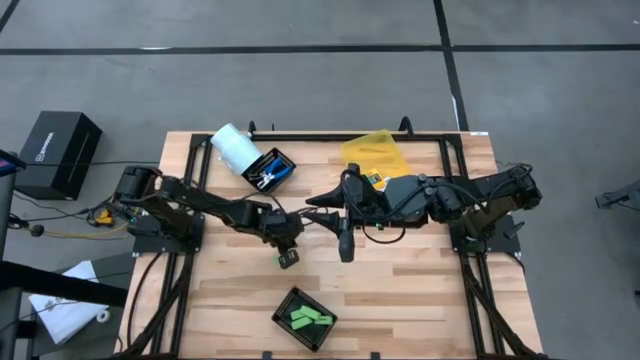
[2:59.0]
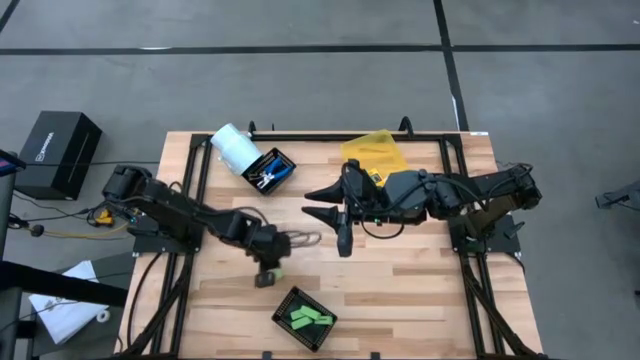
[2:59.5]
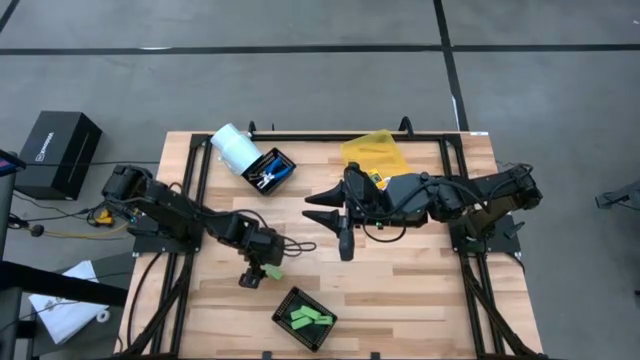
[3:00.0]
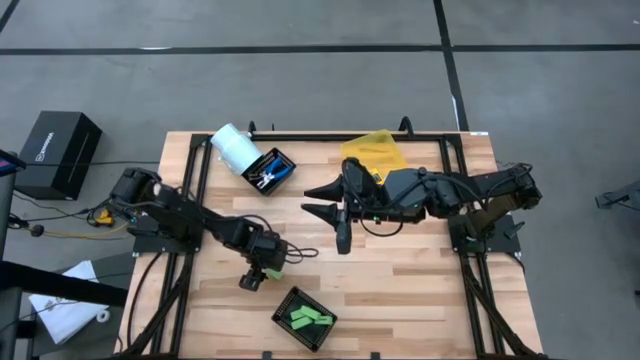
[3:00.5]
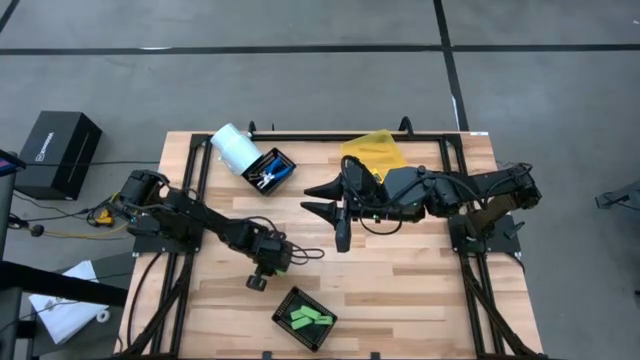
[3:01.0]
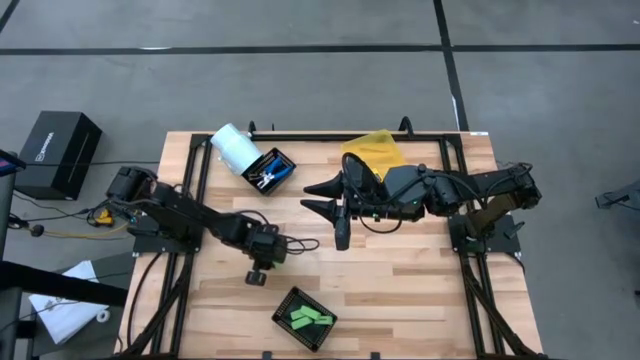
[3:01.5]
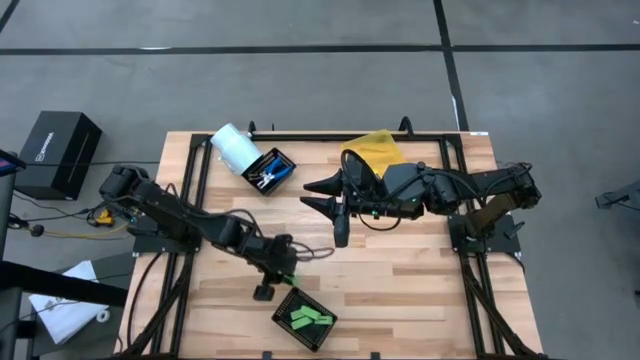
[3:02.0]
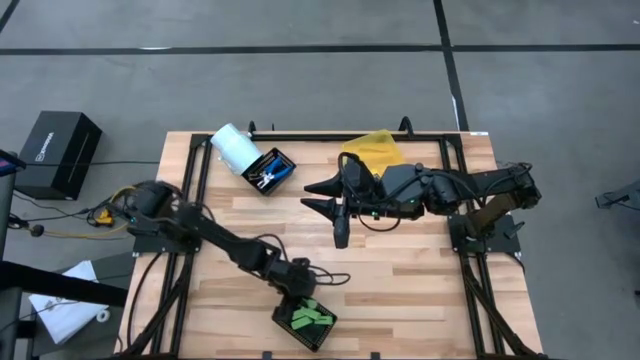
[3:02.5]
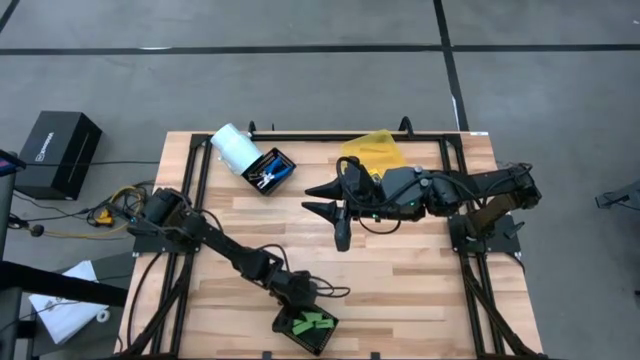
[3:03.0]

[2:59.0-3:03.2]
Task: Pick & Place School Supplies
Put the green eraser into the bottom black bin

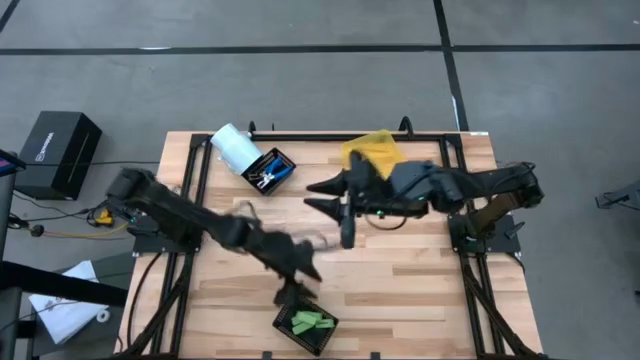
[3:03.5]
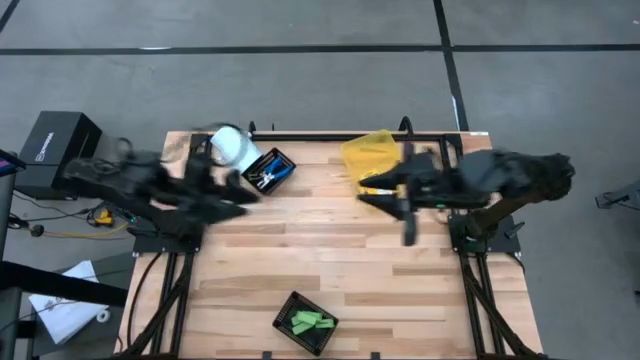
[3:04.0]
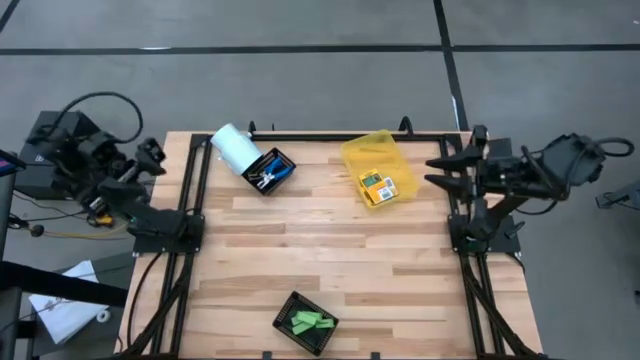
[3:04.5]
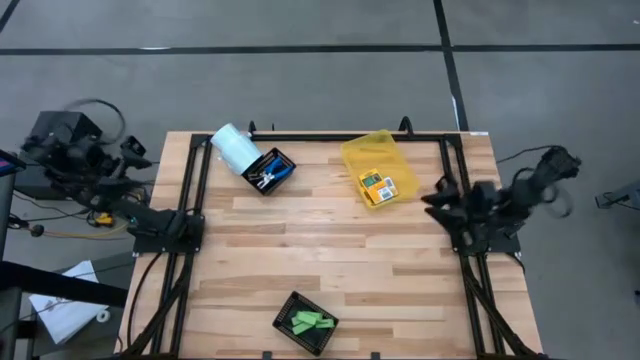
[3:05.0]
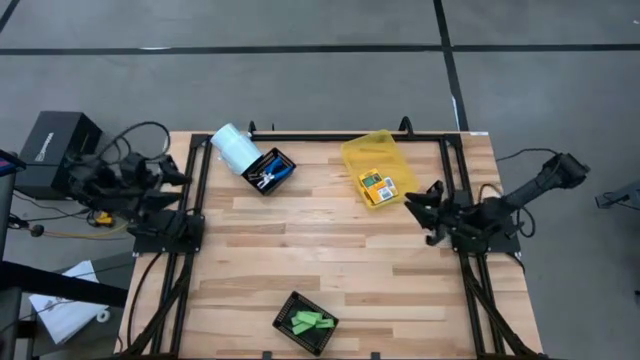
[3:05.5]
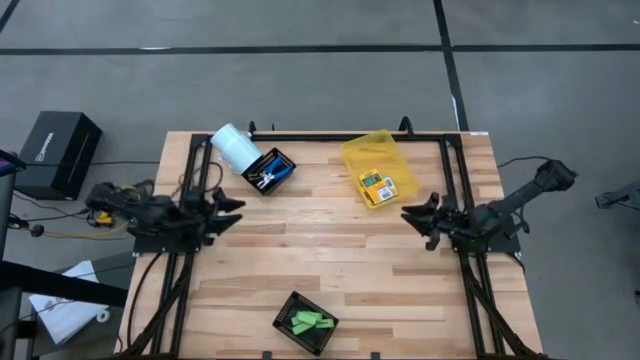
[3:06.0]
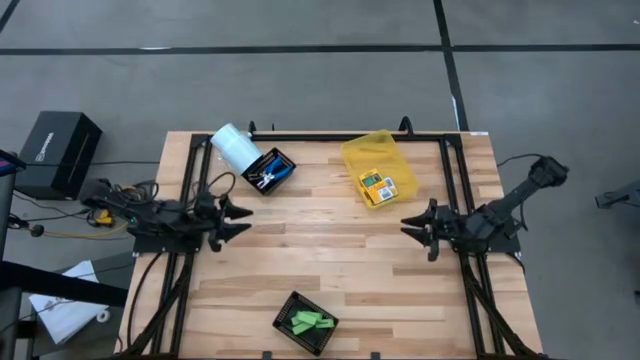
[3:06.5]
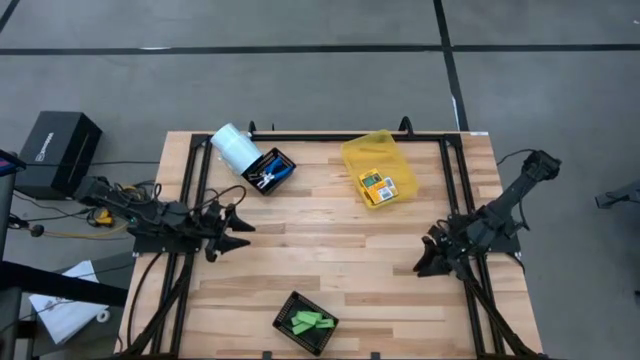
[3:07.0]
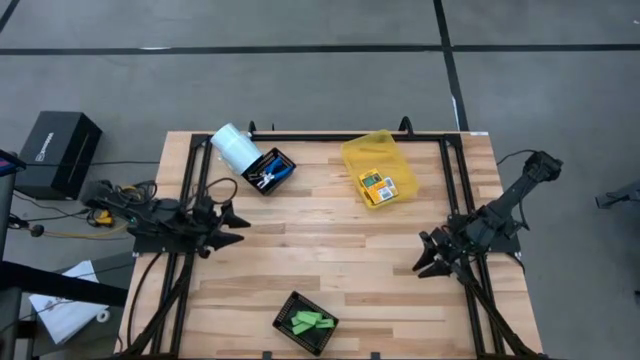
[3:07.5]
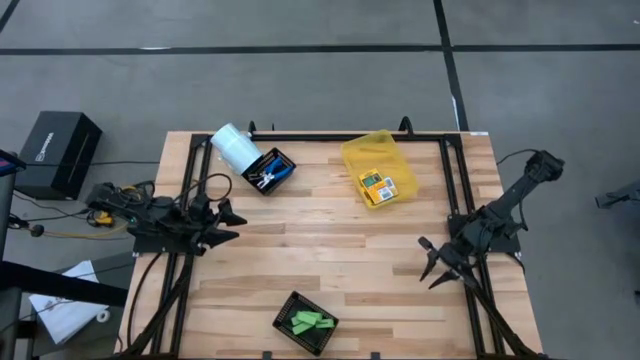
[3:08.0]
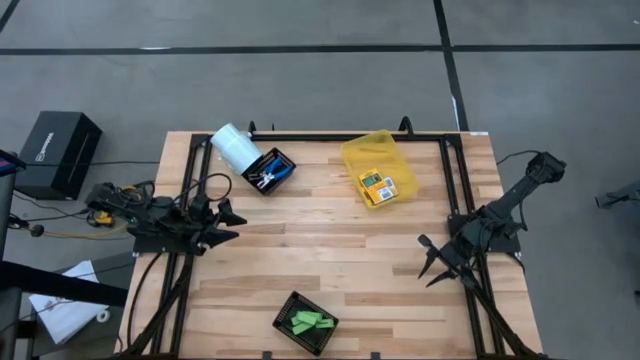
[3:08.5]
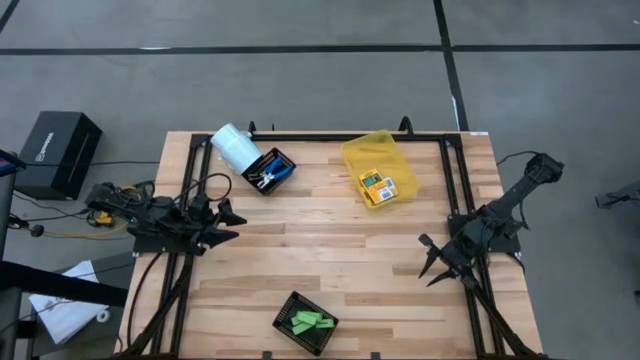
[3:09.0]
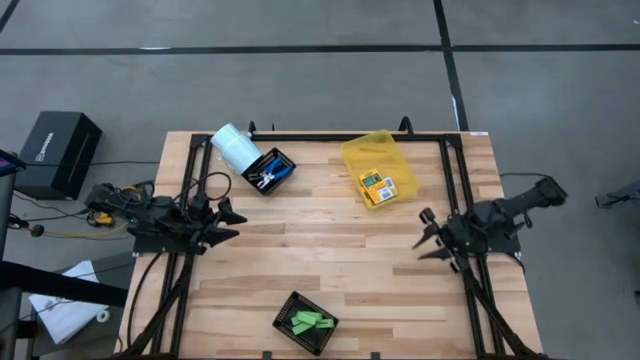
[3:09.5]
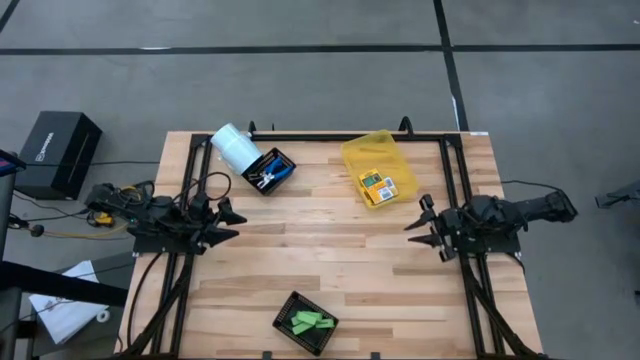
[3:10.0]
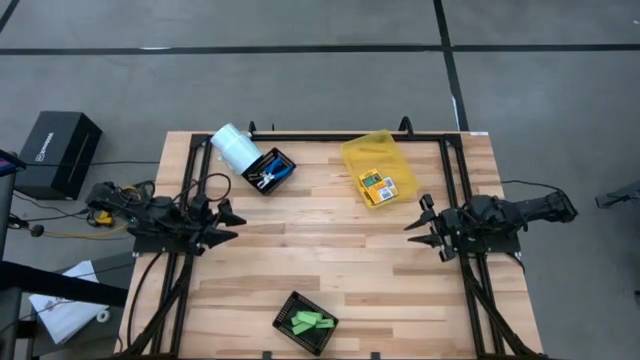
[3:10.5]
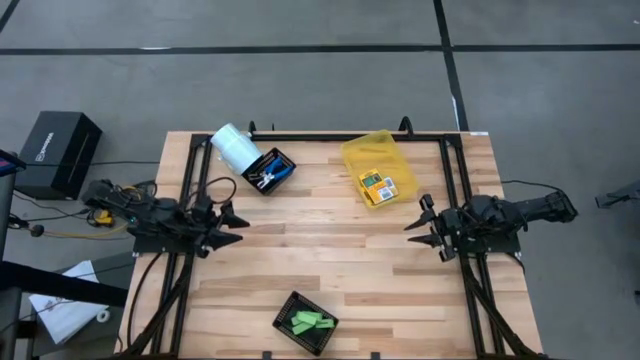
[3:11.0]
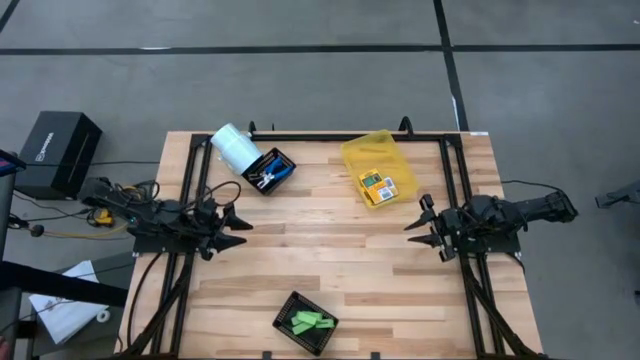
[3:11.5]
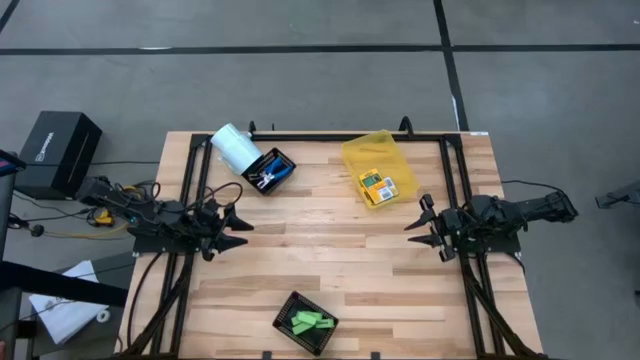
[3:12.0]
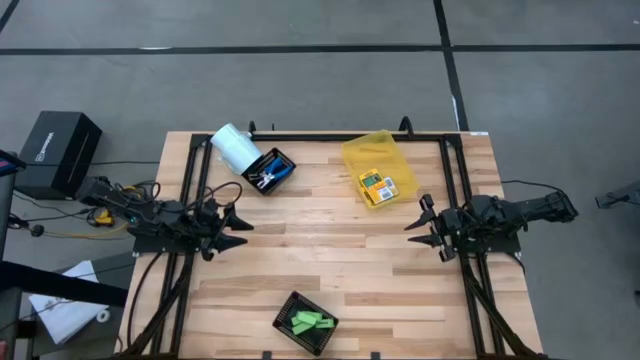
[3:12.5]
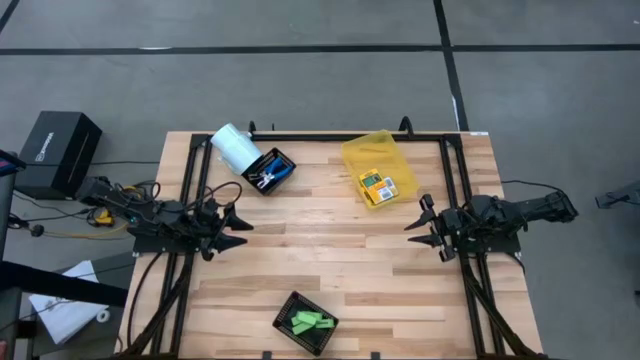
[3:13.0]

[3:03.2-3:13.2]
Return to Home Position

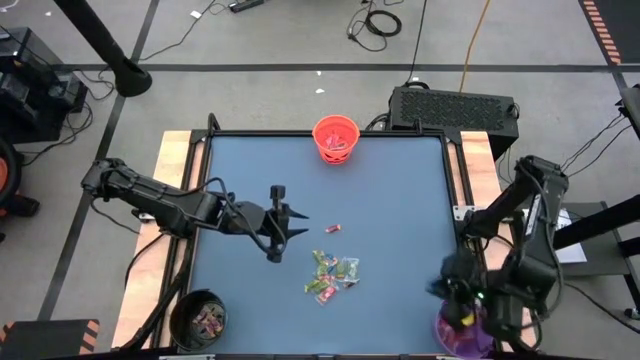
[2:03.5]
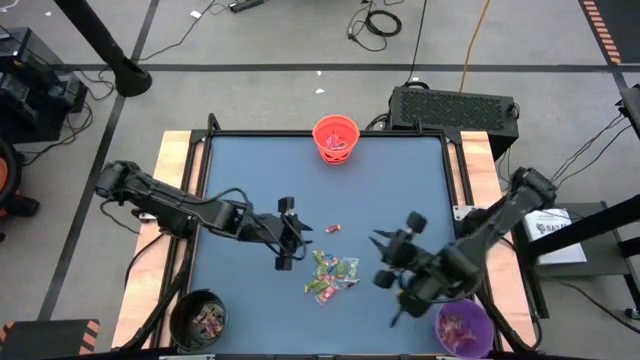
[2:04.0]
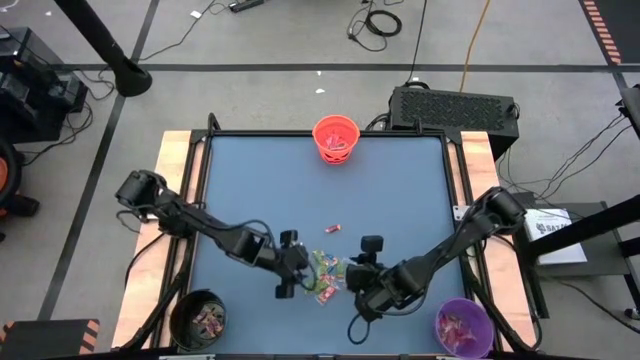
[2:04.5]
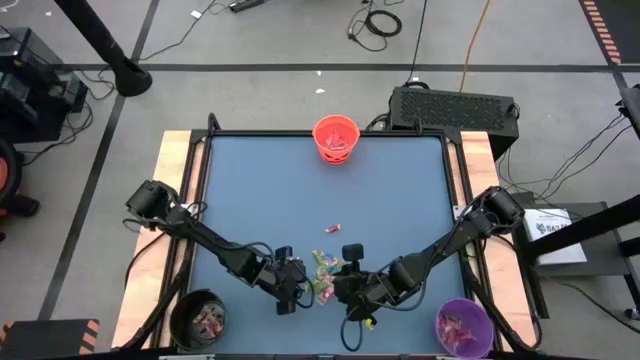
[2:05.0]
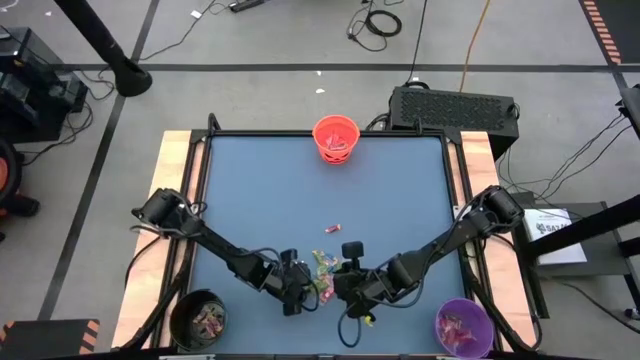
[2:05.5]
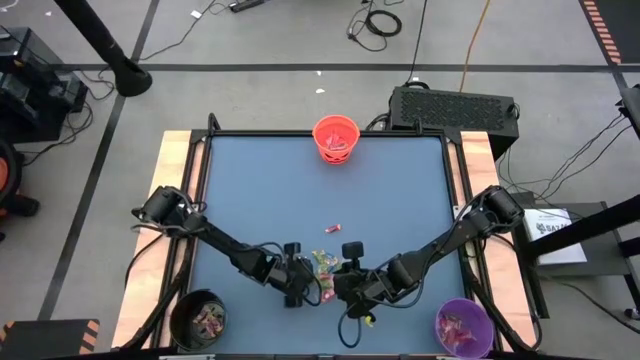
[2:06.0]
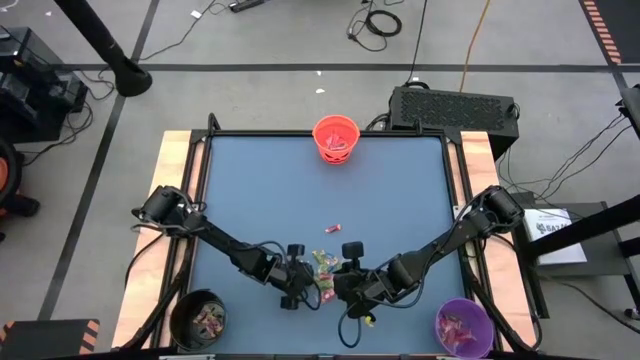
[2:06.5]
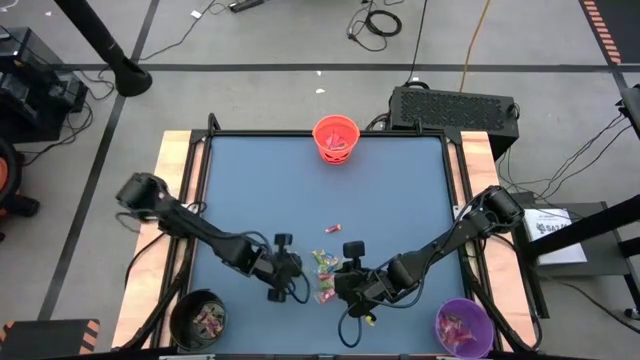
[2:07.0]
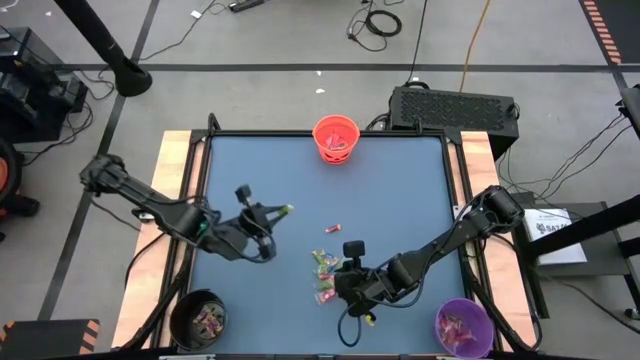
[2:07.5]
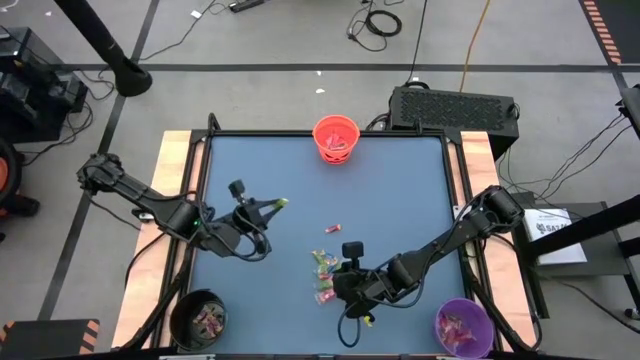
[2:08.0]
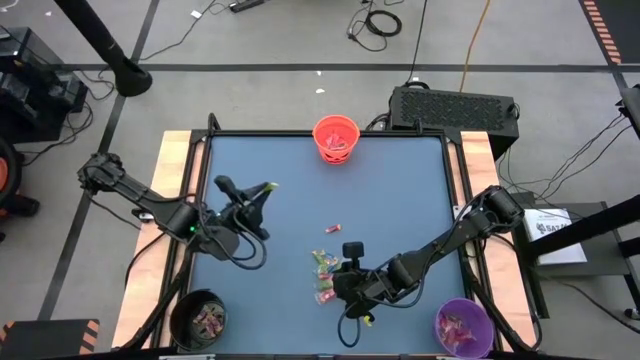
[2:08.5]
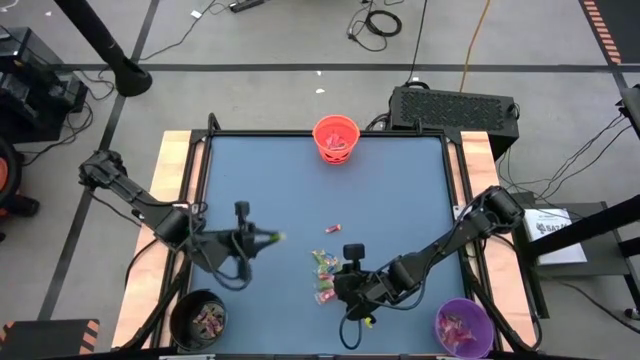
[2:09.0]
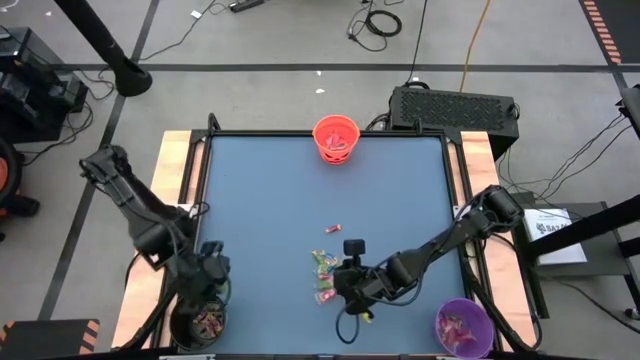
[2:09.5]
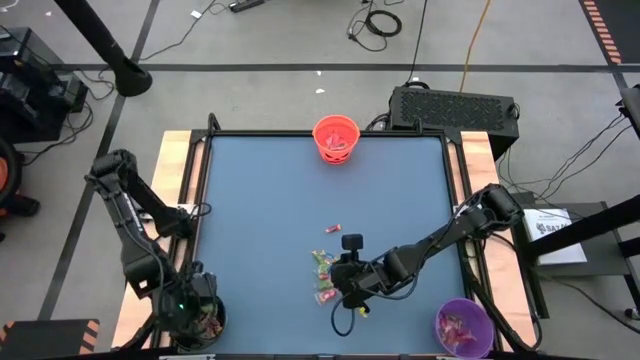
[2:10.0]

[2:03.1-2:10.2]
Task: Sort candy by brand, put in halloween buckets
Put the green candy into the black bucket
